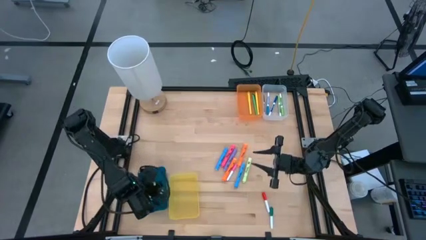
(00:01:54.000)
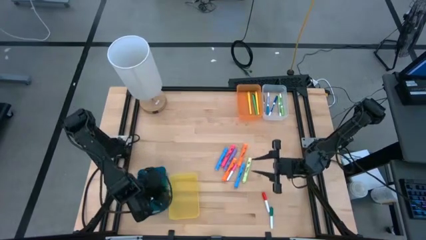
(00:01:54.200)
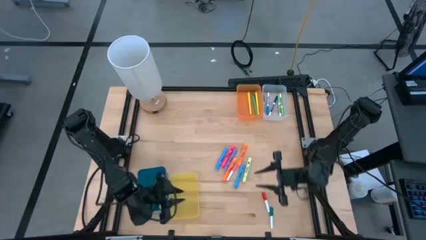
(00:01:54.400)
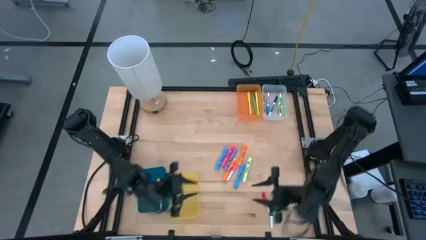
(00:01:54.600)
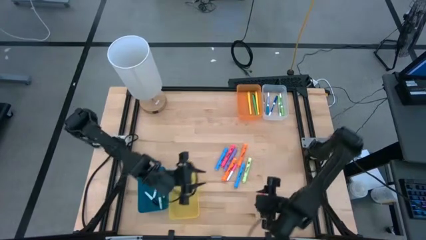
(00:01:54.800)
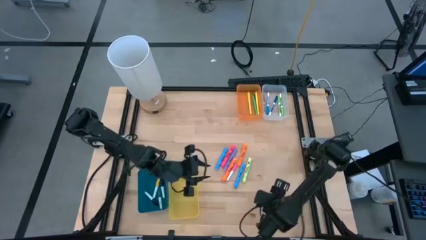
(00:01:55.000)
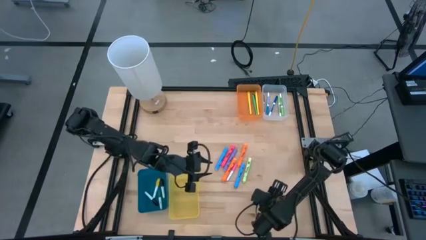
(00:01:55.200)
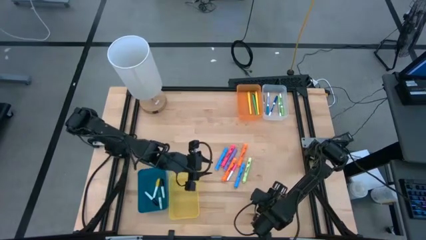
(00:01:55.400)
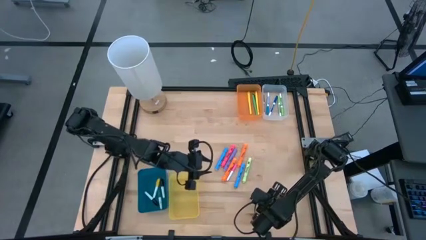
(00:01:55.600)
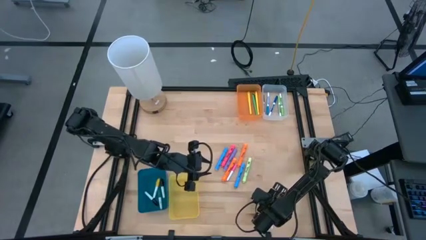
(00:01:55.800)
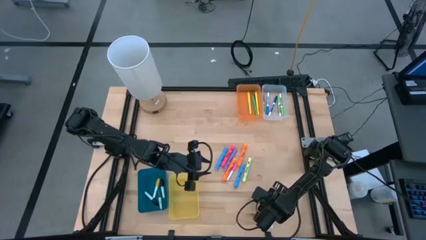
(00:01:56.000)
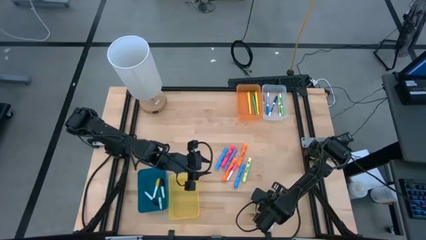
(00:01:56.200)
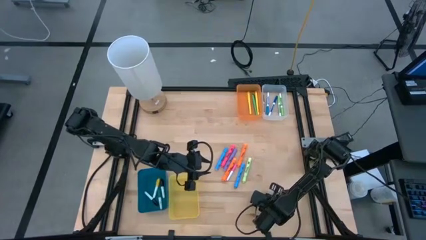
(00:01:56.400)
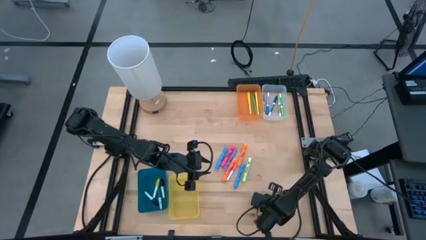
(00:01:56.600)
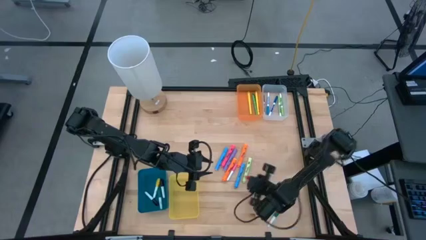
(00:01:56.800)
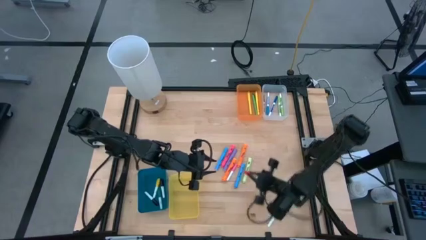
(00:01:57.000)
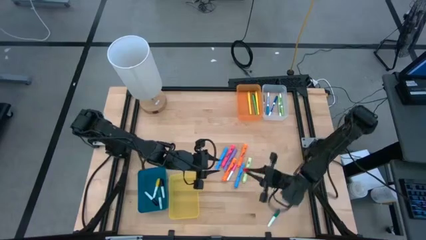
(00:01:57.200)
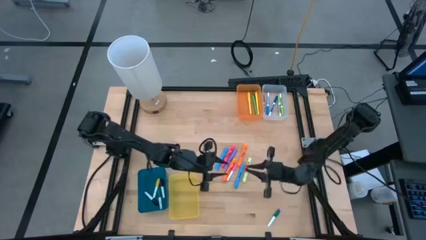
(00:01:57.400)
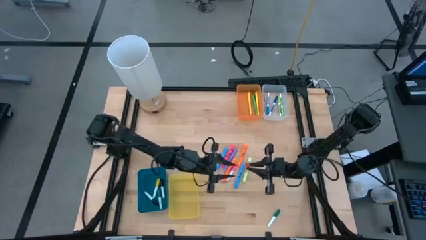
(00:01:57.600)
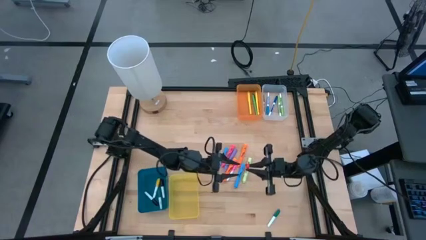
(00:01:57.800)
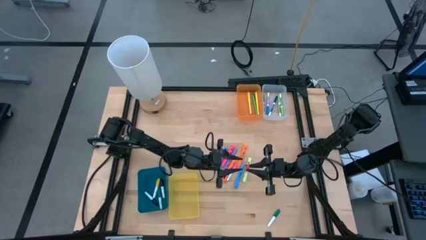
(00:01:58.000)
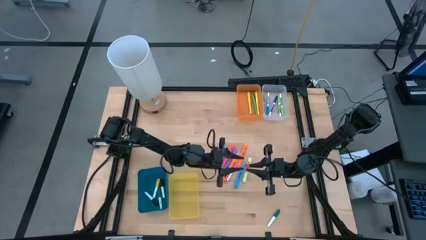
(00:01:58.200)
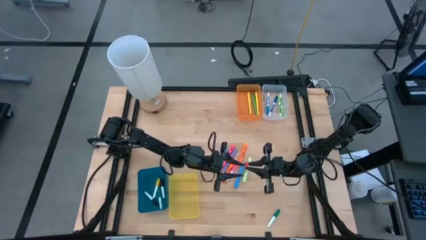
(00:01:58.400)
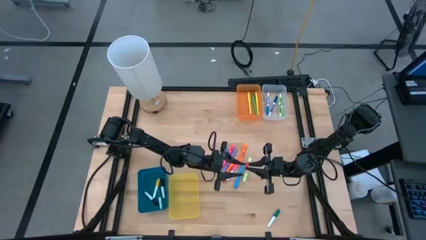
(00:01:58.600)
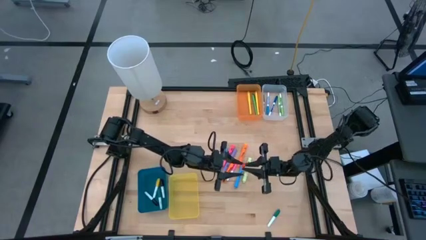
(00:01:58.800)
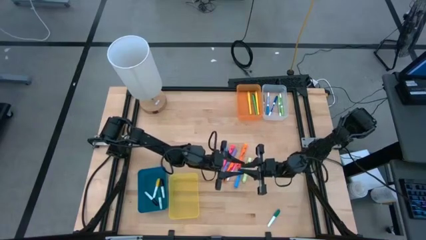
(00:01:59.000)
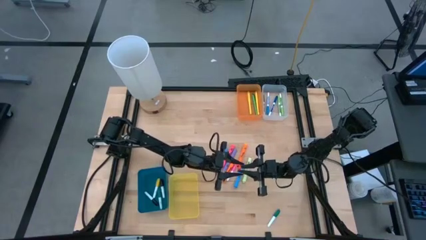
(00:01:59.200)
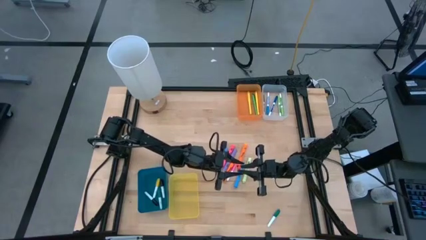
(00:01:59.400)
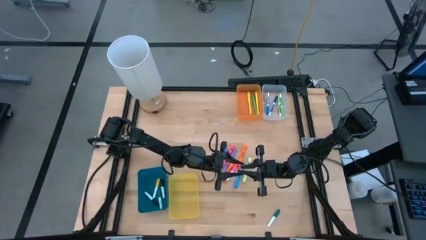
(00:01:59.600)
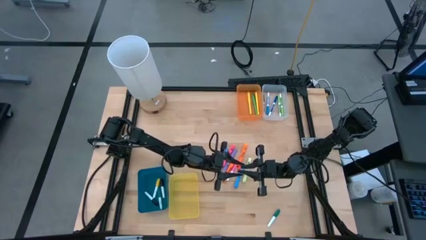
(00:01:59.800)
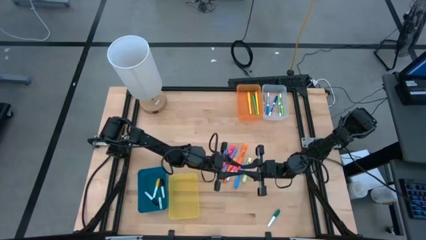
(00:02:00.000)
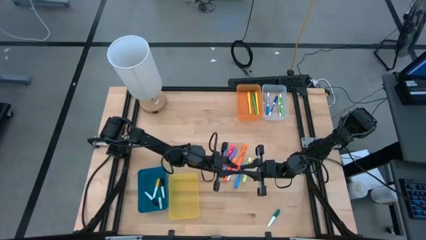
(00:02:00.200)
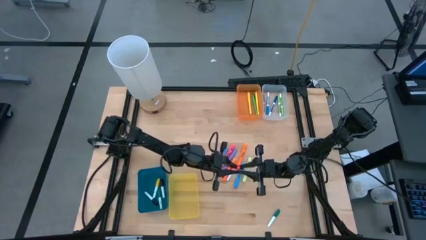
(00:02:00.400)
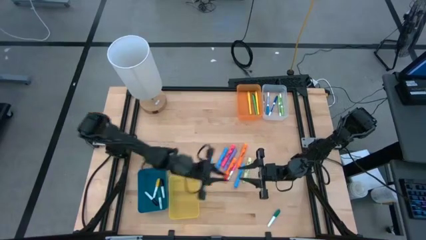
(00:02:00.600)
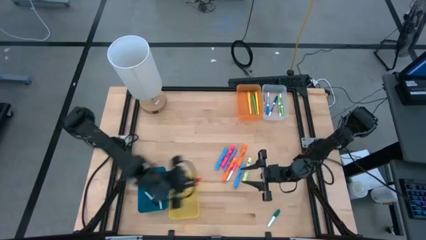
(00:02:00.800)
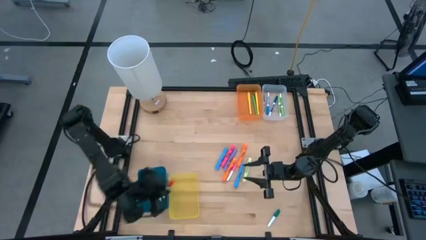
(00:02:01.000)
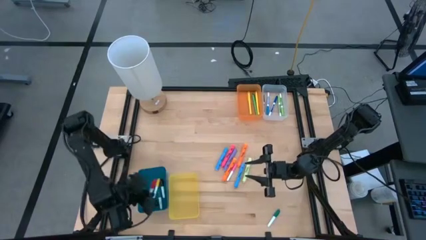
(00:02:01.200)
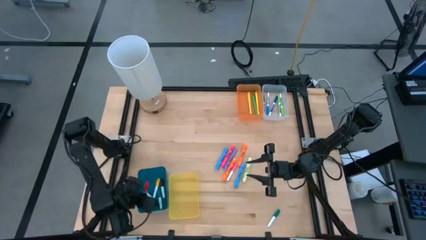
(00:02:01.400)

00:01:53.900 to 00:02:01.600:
Task: Pick & Place Markers
Put the white and red highlighter pen into the blue bin

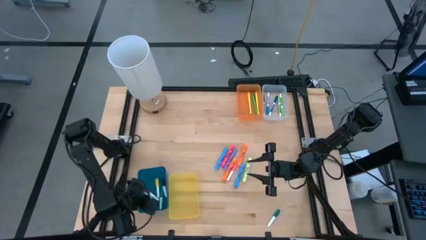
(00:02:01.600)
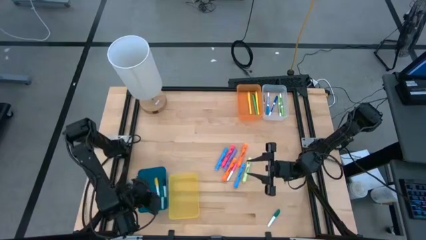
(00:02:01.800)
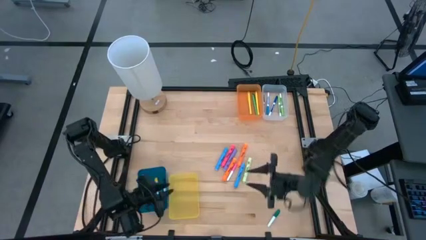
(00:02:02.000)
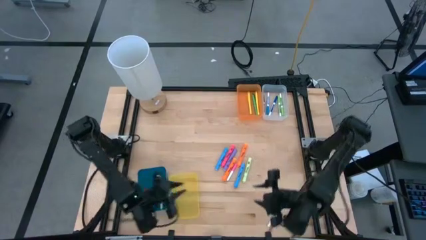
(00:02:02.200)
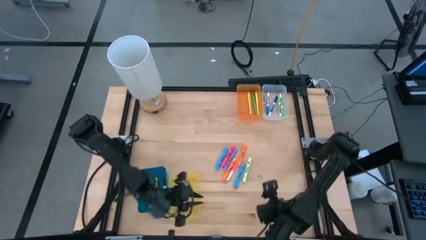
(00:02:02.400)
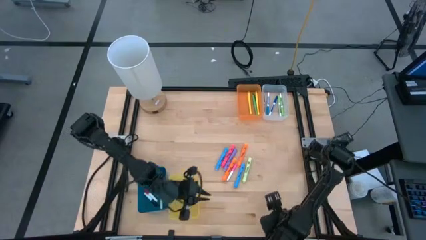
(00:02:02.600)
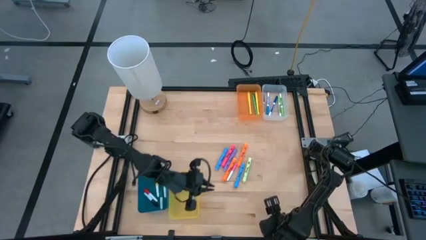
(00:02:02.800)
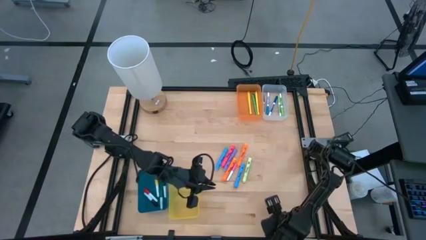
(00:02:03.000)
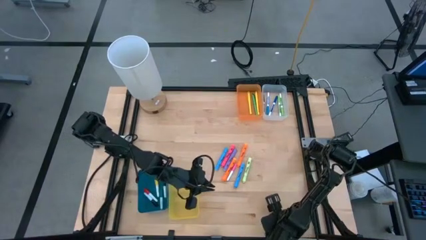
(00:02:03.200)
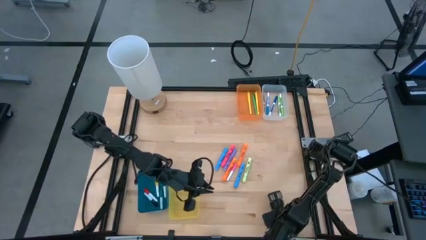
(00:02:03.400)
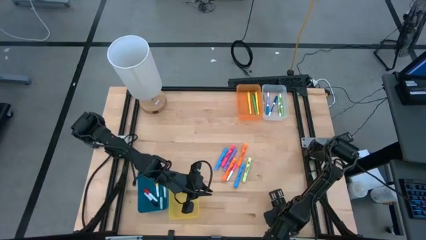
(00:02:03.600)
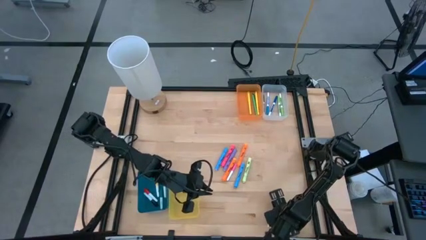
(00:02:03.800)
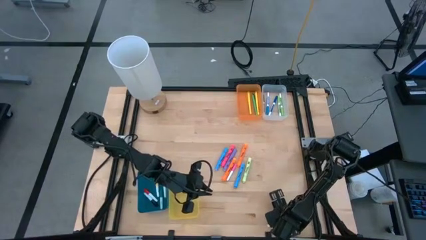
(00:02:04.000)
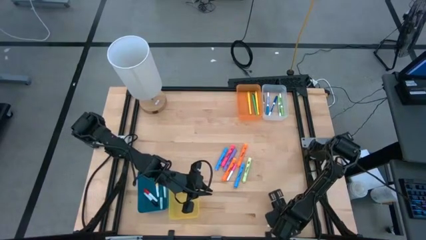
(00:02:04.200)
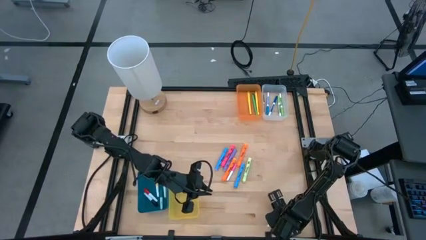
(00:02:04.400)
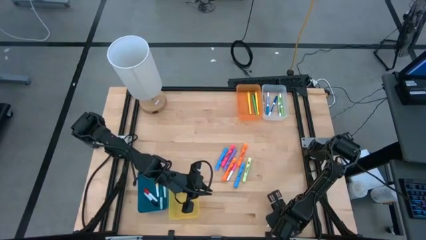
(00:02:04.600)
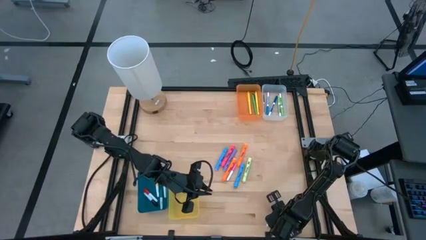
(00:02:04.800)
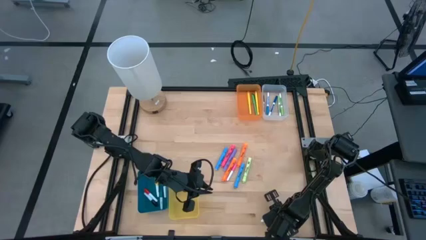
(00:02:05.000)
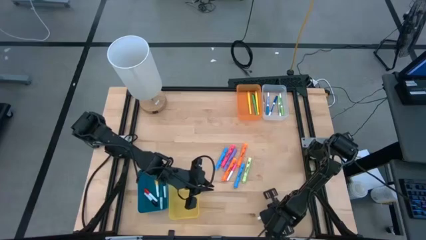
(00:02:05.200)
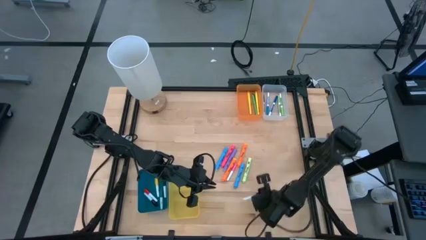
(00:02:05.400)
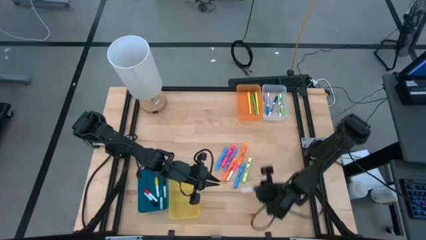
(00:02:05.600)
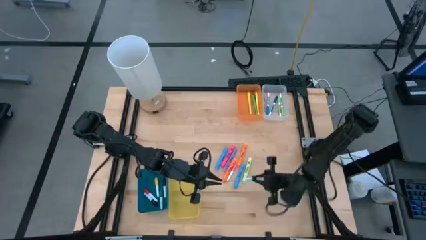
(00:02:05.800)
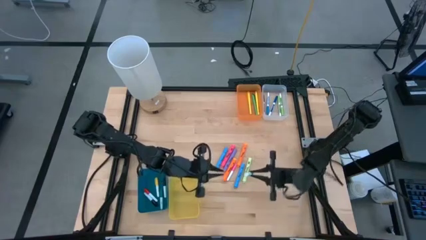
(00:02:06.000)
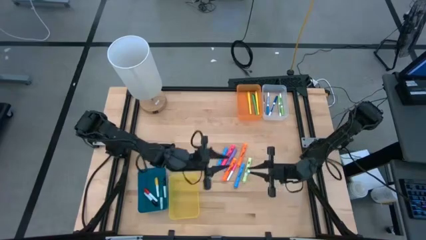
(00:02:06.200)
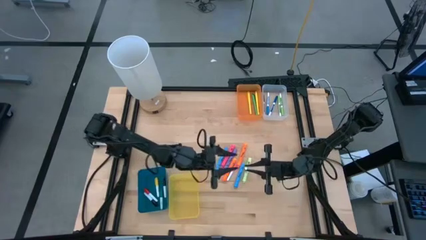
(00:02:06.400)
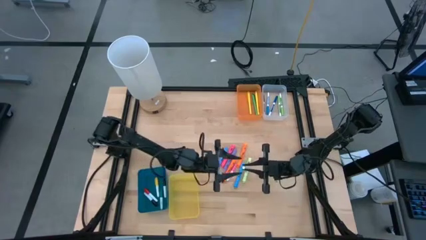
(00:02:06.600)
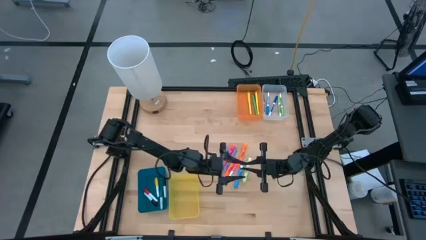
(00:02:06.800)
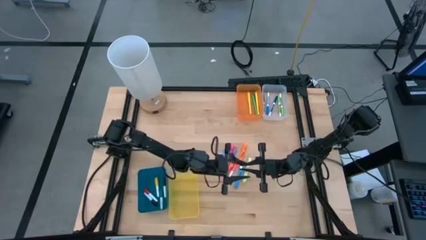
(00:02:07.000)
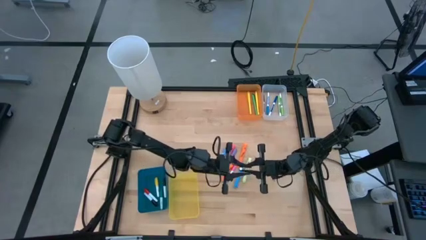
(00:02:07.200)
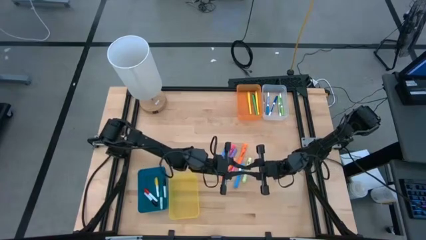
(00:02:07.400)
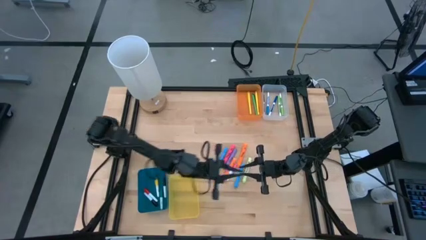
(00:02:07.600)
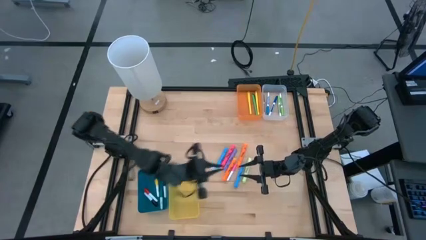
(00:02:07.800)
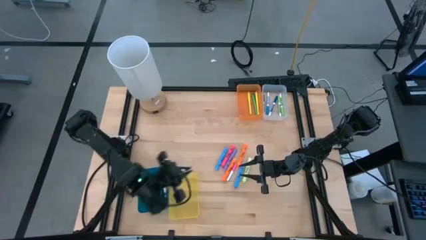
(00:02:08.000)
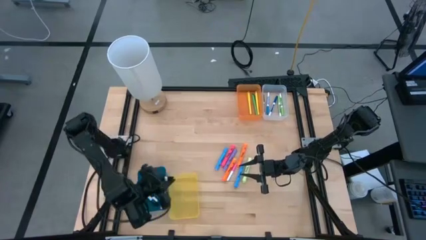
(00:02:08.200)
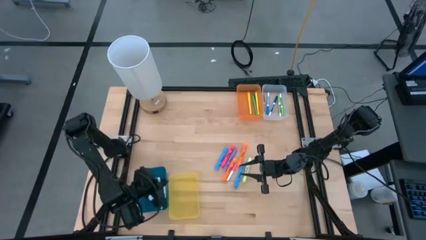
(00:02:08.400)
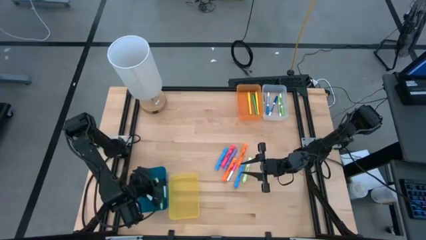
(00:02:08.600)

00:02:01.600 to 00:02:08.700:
Put the white and green highlighter pen into the blue bin
